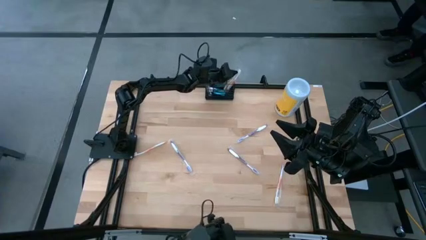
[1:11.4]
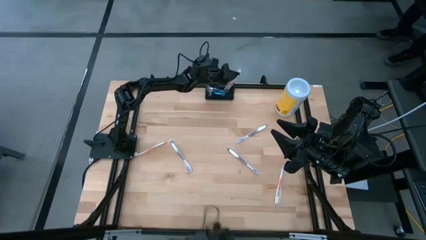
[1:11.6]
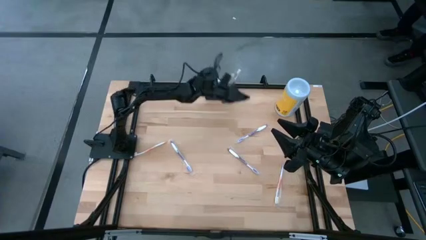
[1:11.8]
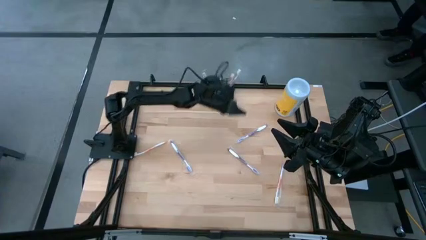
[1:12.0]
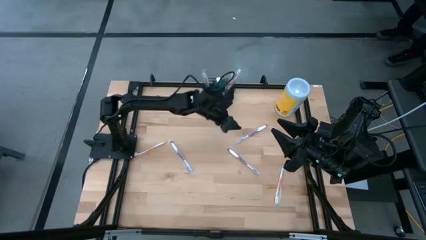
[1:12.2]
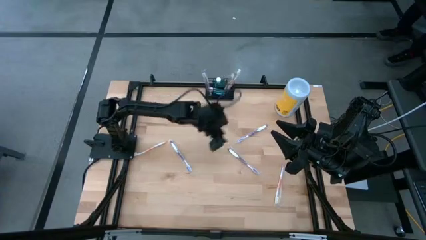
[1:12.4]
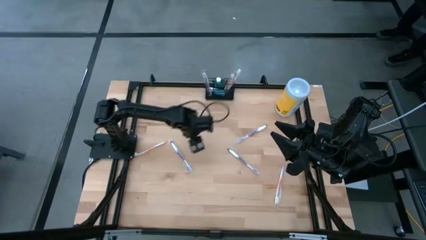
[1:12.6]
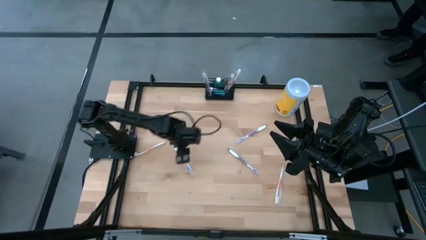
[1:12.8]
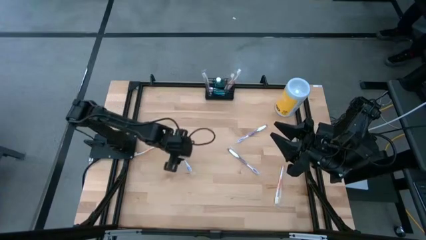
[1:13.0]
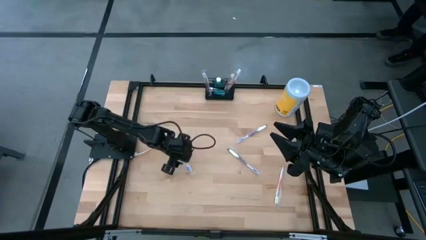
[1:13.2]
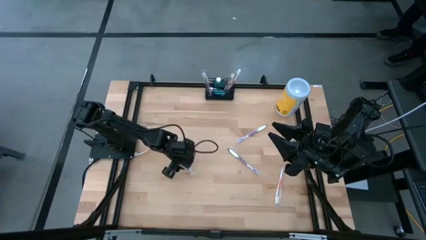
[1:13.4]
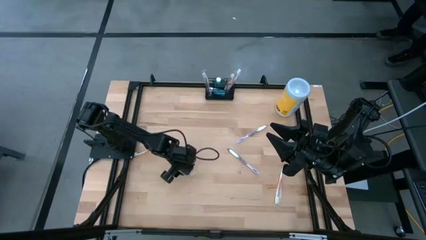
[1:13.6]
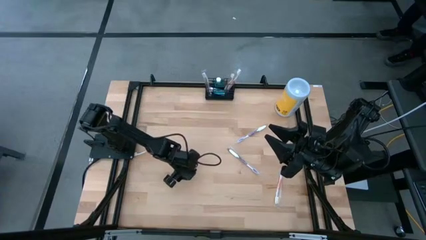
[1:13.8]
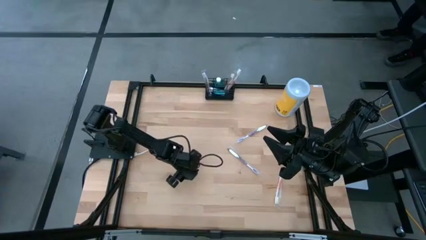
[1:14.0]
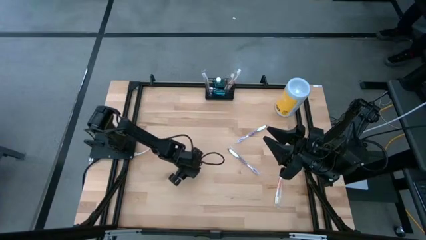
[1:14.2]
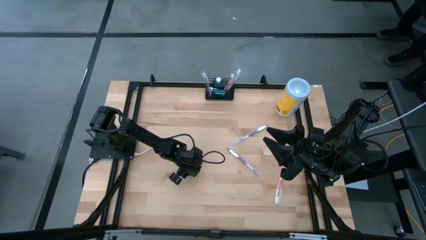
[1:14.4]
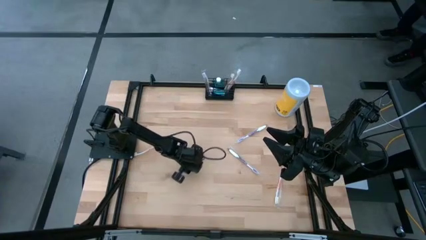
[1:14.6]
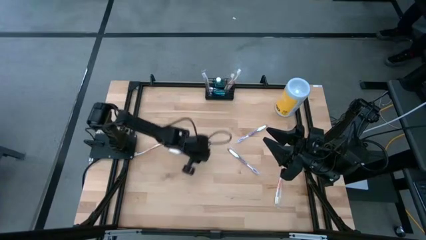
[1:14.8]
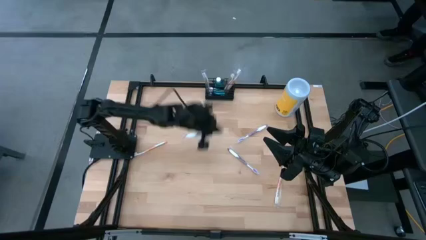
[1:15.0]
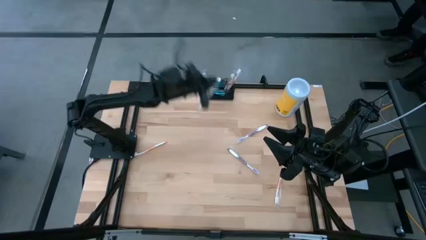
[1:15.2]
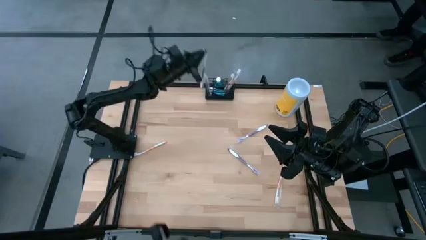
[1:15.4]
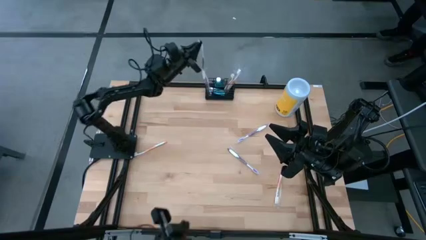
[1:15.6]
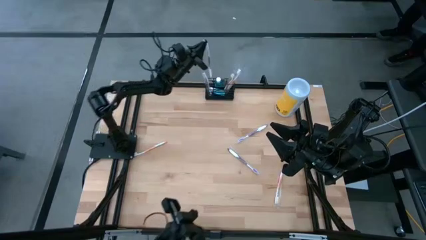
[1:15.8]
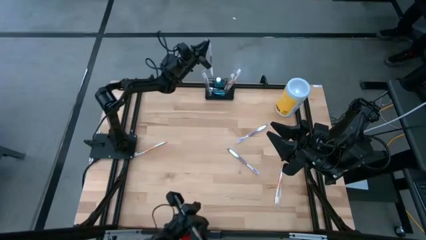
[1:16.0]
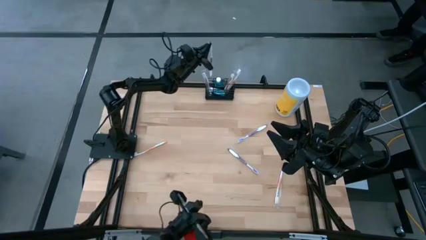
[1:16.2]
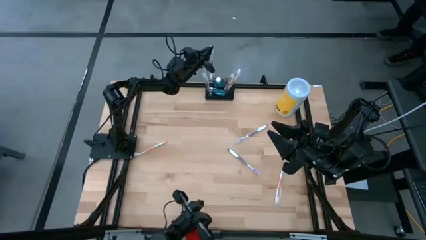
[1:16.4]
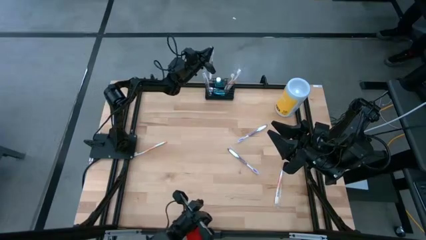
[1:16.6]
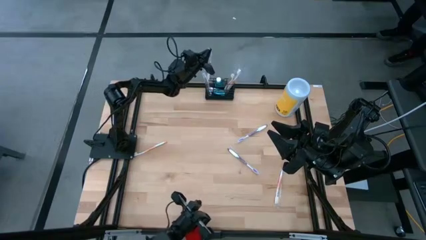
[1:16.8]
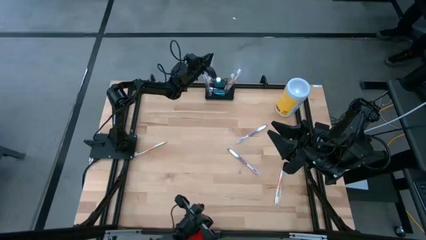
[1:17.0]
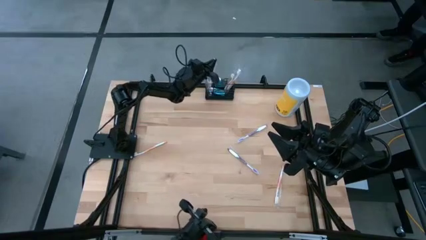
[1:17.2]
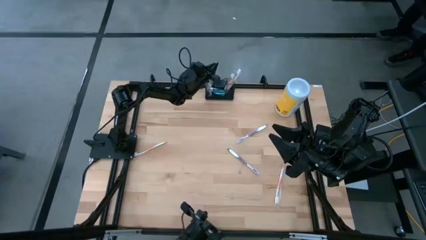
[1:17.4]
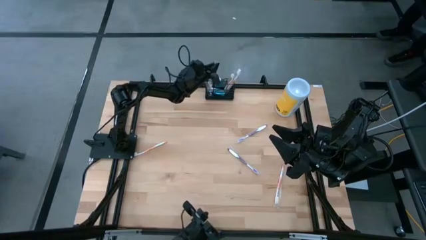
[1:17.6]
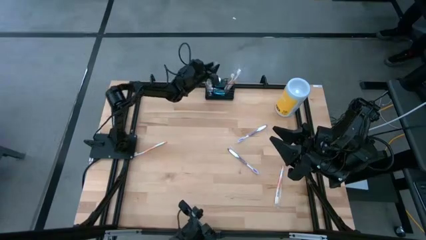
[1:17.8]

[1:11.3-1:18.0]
Task: Pick & Place toothbrushing station
Put the violet toothbrush into the black wire organizer bin

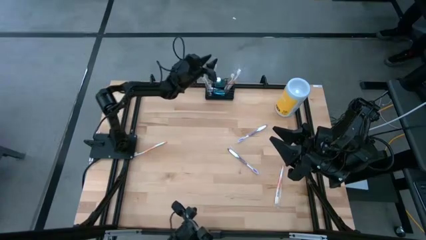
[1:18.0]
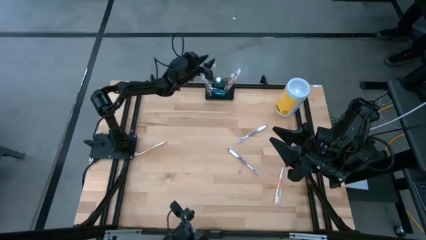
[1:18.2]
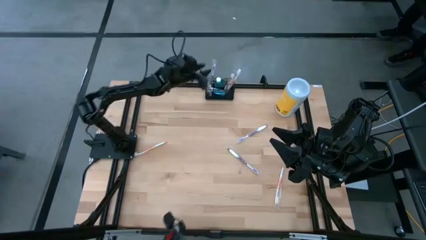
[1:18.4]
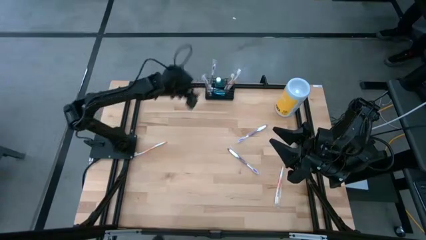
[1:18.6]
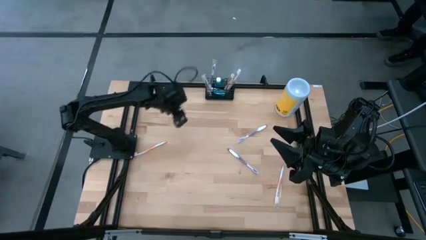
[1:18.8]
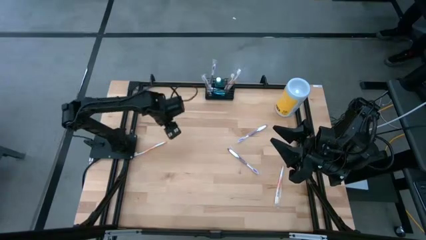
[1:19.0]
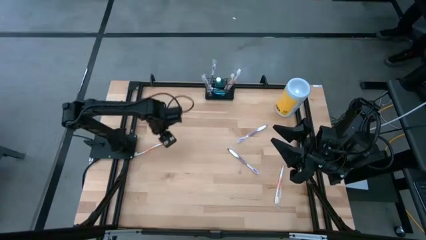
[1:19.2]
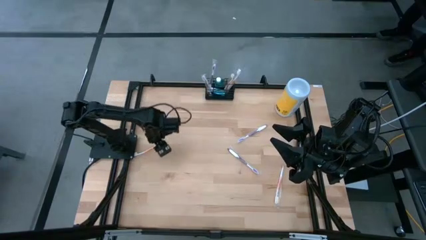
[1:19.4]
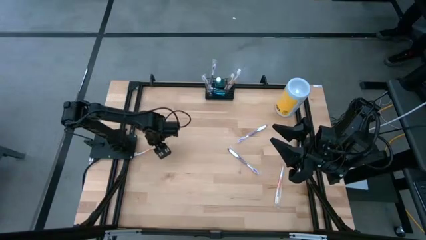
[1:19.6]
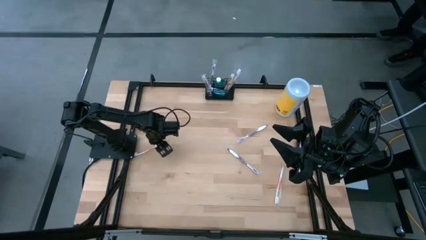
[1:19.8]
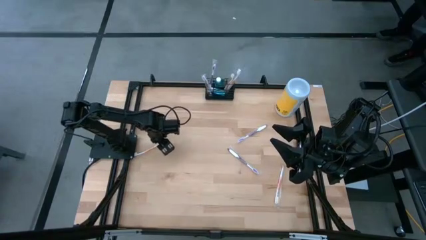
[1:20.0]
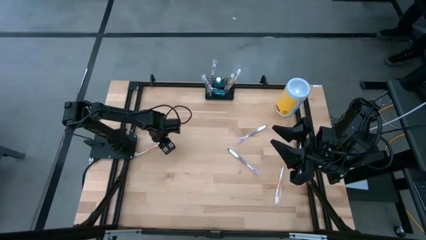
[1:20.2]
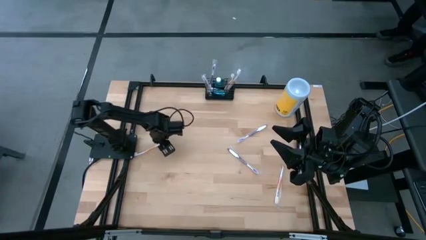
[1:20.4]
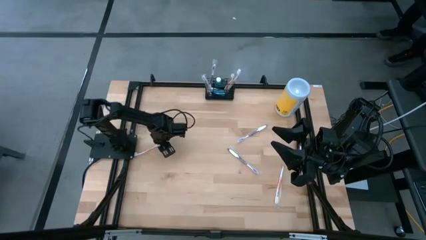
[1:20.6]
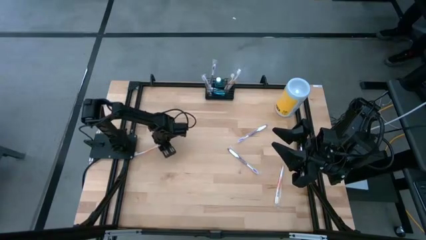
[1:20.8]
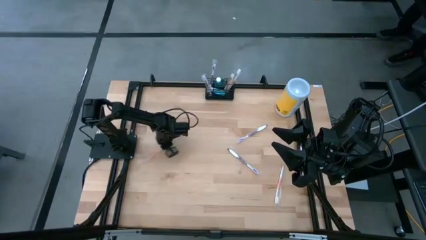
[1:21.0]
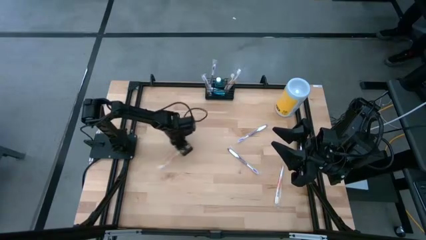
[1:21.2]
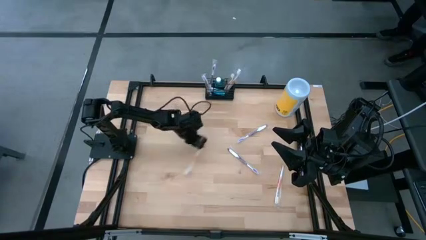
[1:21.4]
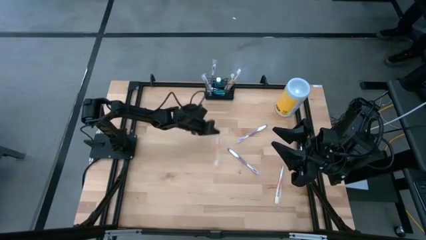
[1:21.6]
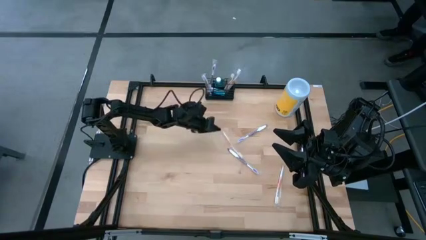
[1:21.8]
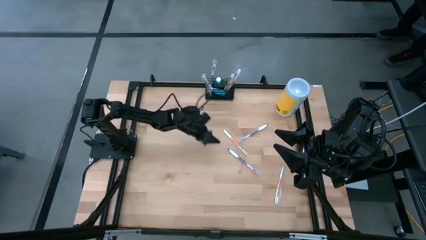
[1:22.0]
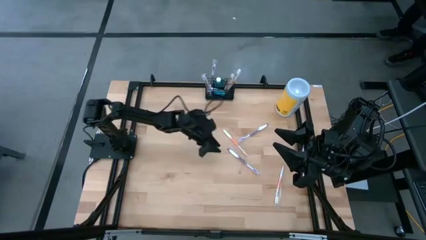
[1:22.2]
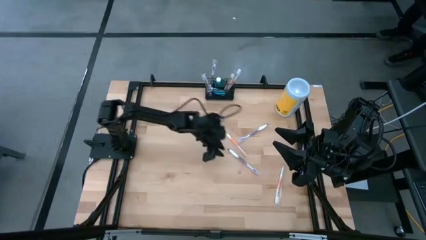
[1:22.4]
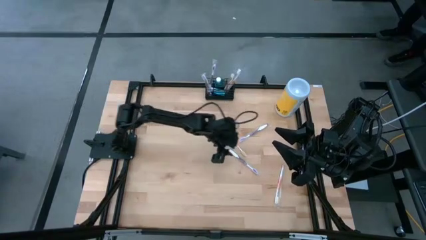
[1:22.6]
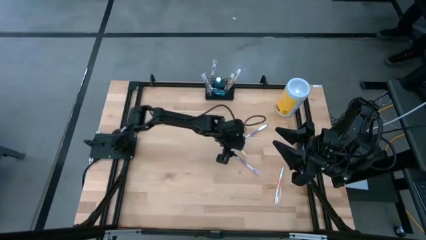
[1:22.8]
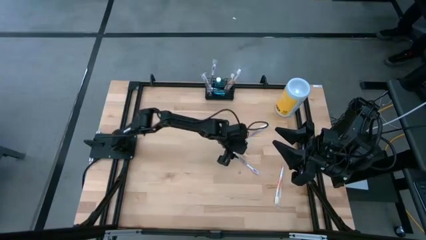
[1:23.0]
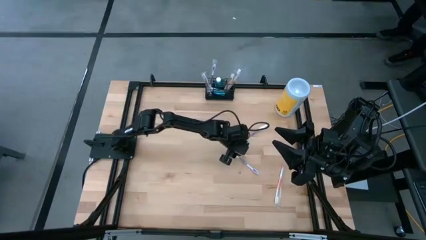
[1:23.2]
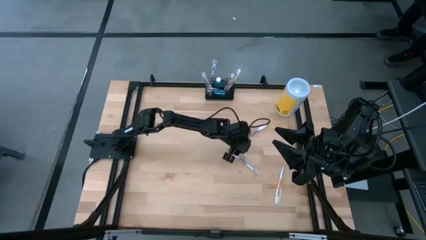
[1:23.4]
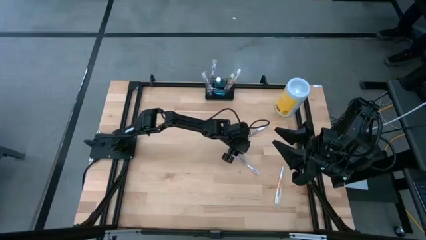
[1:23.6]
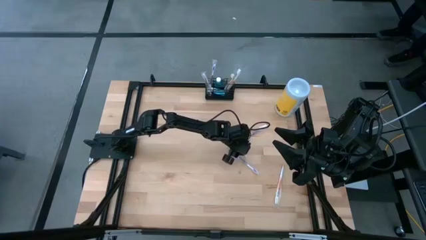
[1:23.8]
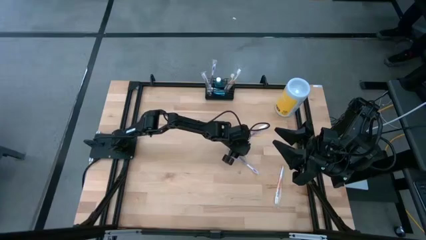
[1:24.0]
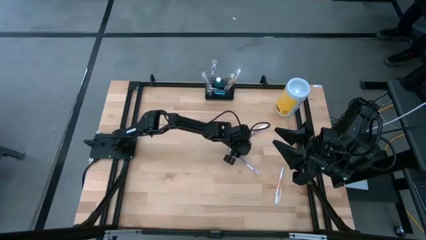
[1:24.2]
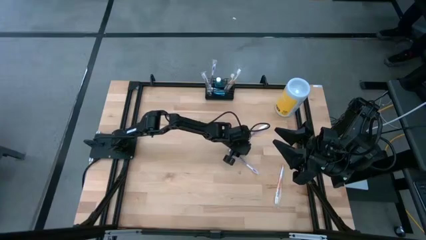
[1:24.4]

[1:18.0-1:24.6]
Put the orange toothbrush into the black wire organizer bin

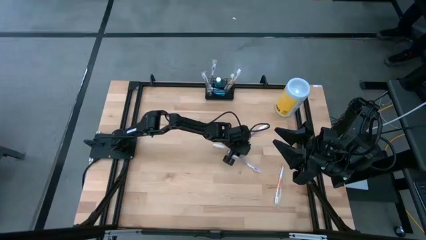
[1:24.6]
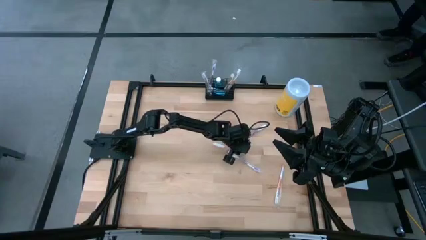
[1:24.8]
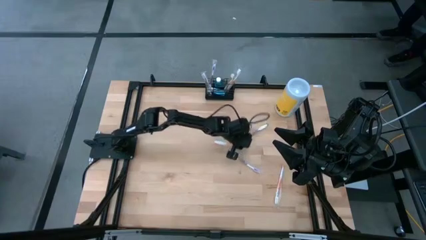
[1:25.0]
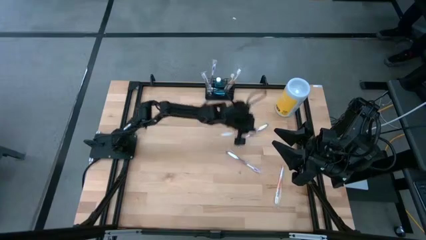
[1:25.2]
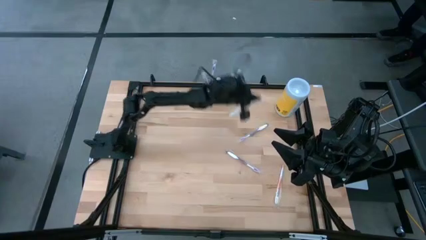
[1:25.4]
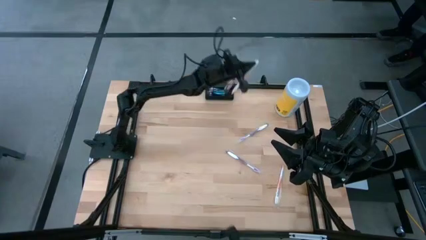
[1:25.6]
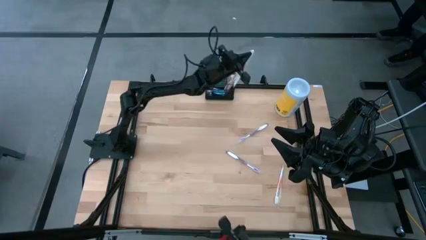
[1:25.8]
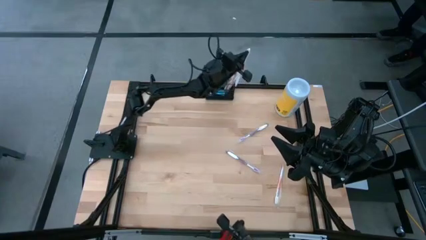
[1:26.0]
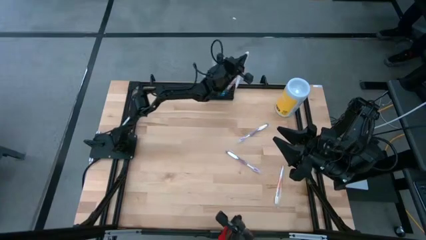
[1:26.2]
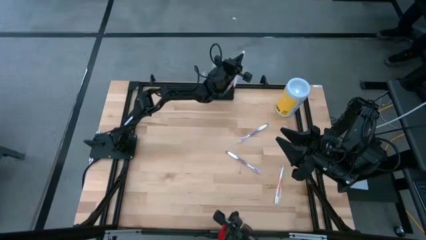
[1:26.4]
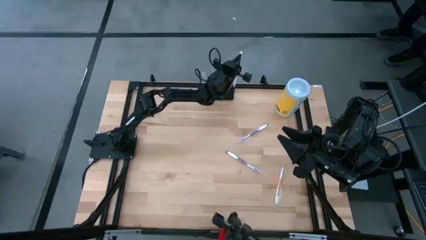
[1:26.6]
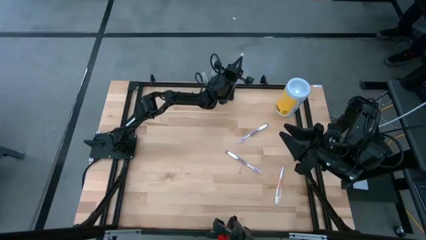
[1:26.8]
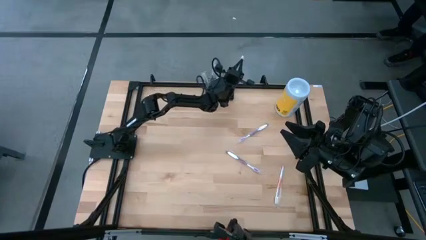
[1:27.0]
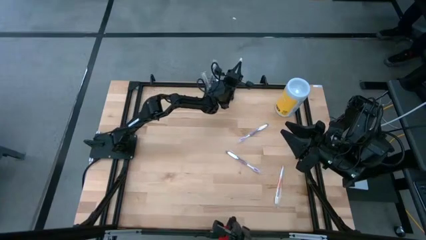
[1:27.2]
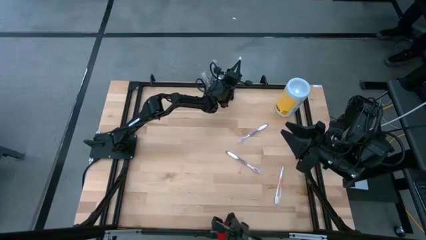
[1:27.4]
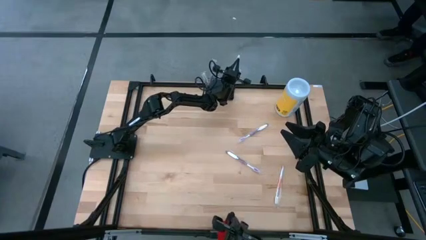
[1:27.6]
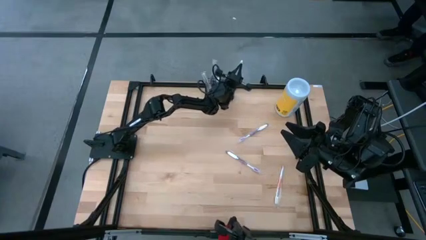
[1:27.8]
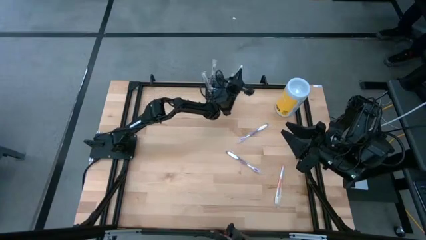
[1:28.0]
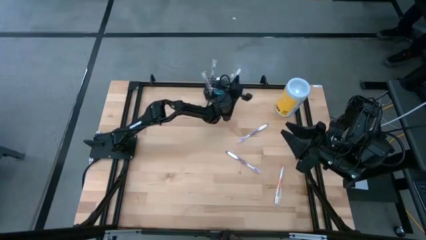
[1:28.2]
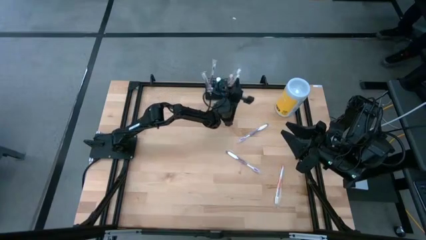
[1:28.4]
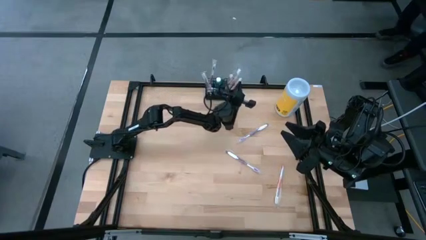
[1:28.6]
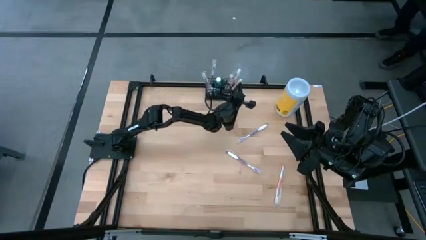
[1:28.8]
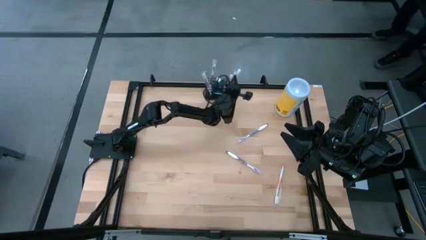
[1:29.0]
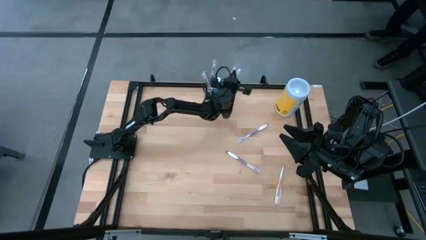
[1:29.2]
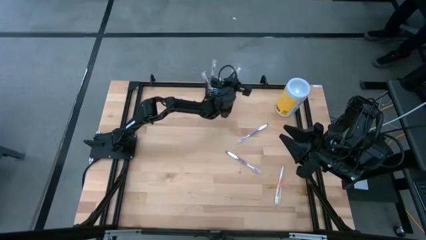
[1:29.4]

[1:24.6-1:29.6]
Put the orange toothbrush into the black wire organizer bin
